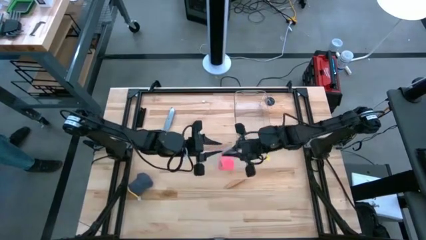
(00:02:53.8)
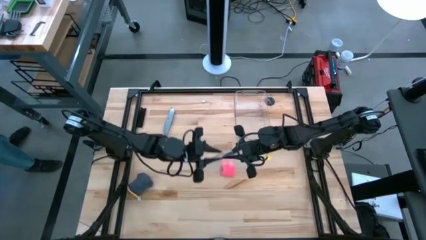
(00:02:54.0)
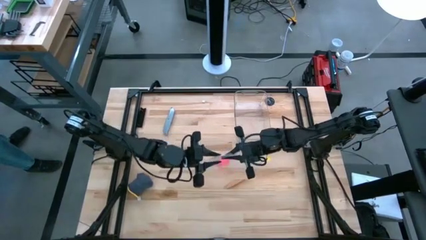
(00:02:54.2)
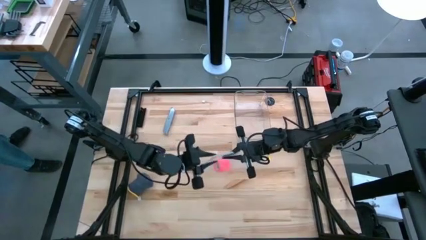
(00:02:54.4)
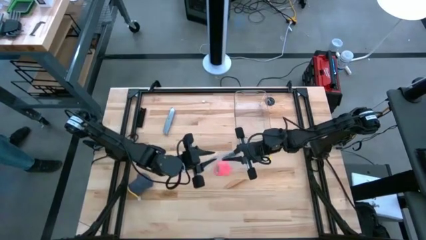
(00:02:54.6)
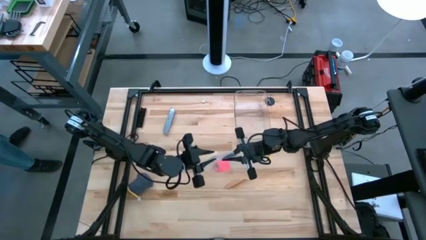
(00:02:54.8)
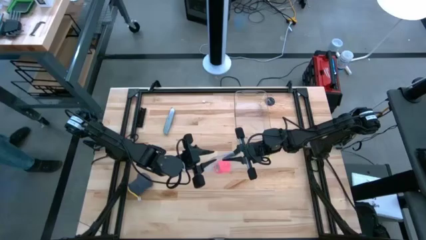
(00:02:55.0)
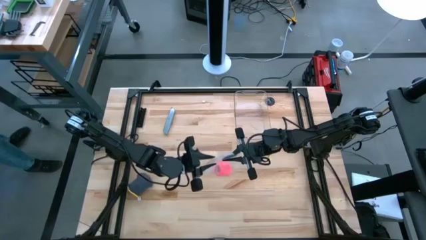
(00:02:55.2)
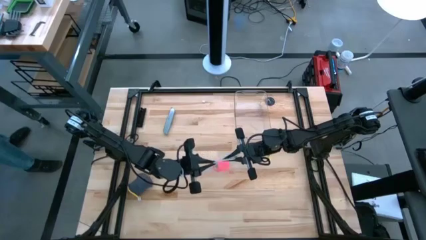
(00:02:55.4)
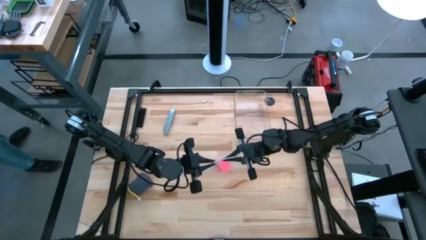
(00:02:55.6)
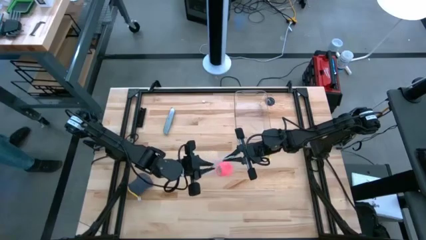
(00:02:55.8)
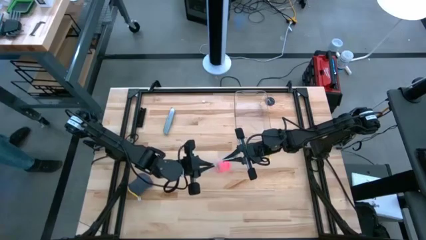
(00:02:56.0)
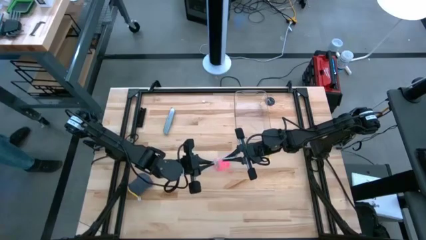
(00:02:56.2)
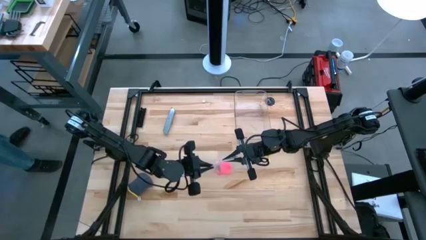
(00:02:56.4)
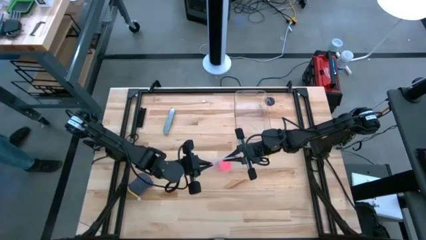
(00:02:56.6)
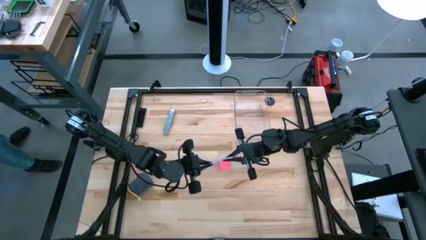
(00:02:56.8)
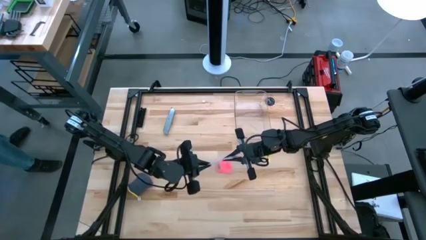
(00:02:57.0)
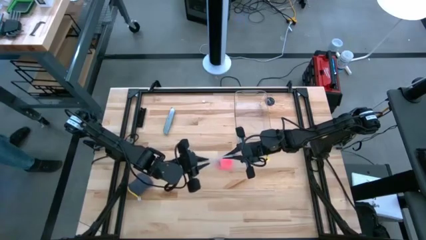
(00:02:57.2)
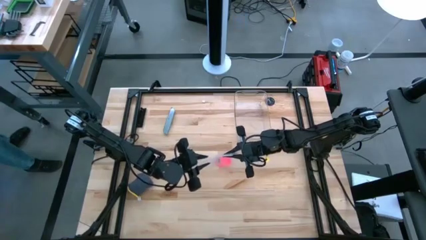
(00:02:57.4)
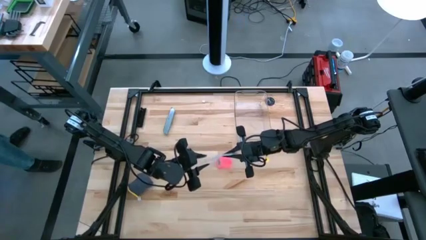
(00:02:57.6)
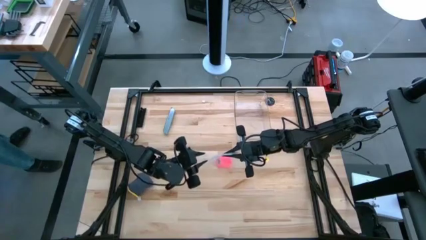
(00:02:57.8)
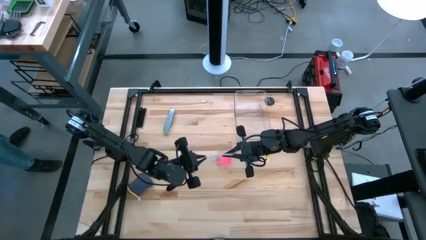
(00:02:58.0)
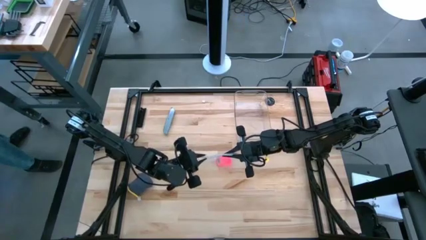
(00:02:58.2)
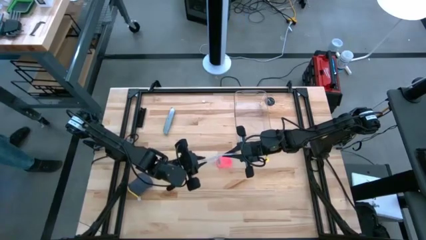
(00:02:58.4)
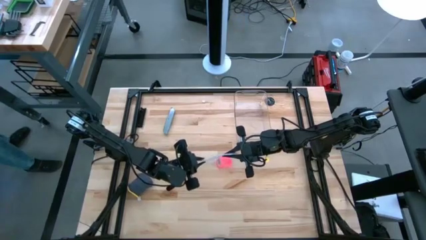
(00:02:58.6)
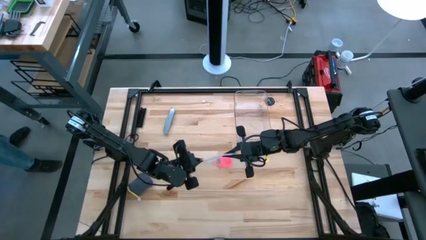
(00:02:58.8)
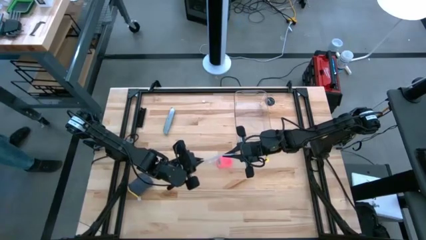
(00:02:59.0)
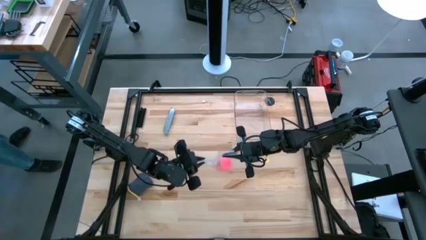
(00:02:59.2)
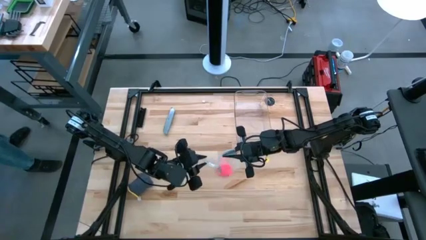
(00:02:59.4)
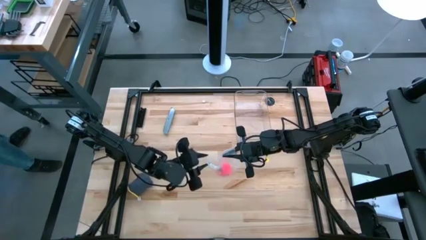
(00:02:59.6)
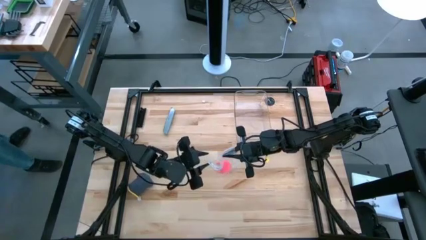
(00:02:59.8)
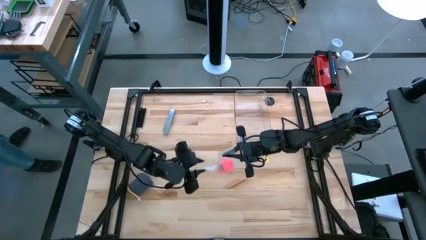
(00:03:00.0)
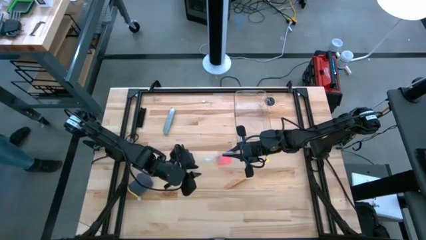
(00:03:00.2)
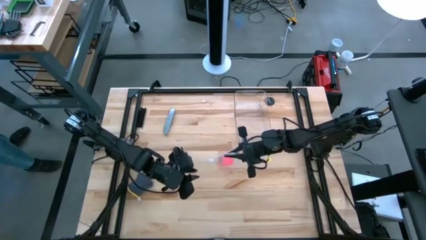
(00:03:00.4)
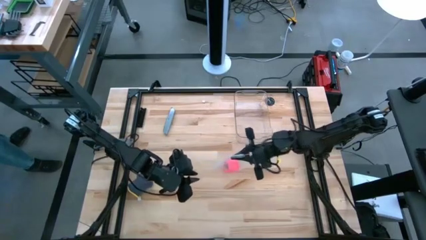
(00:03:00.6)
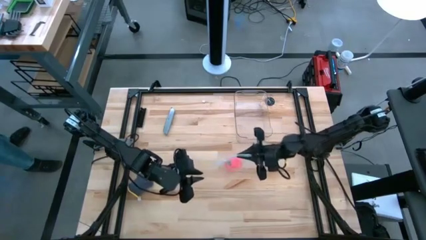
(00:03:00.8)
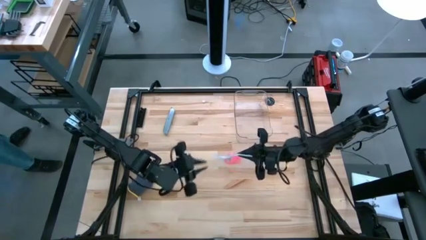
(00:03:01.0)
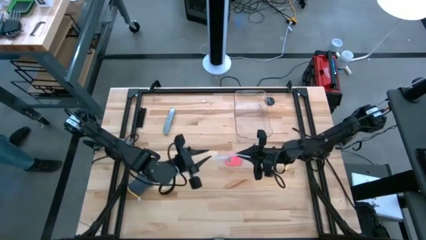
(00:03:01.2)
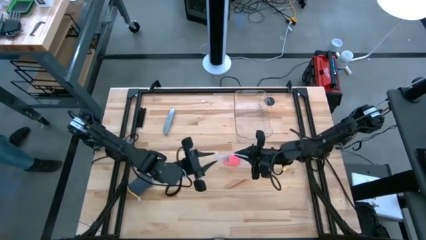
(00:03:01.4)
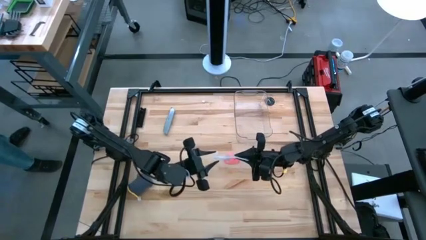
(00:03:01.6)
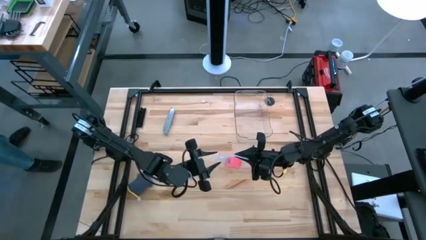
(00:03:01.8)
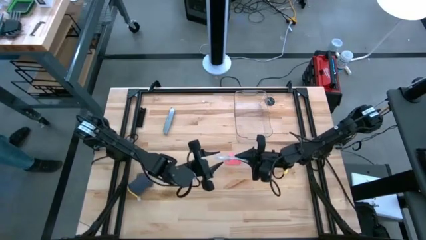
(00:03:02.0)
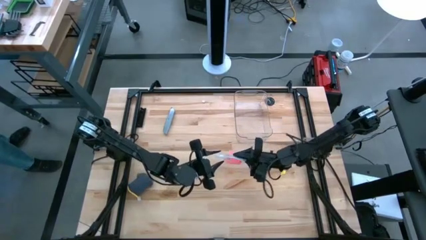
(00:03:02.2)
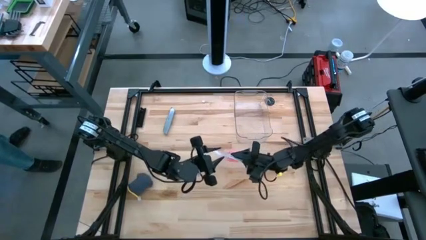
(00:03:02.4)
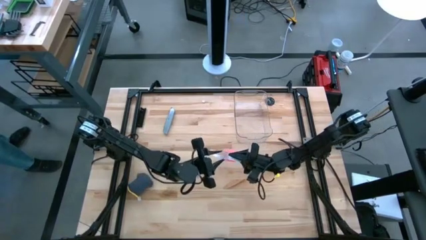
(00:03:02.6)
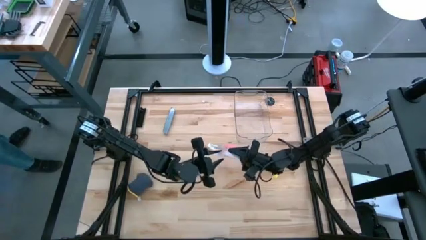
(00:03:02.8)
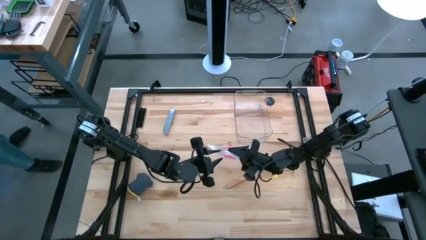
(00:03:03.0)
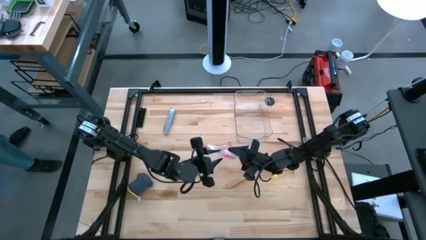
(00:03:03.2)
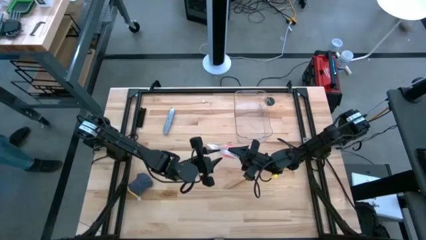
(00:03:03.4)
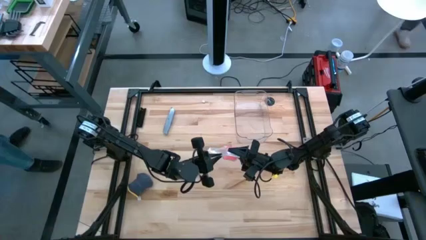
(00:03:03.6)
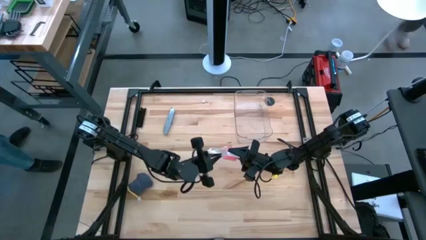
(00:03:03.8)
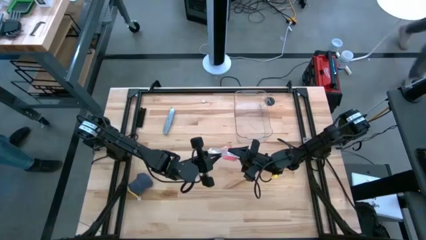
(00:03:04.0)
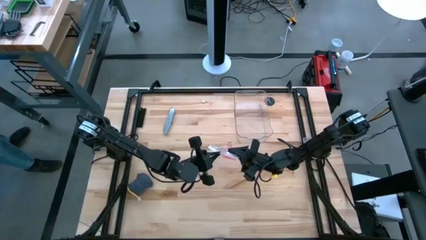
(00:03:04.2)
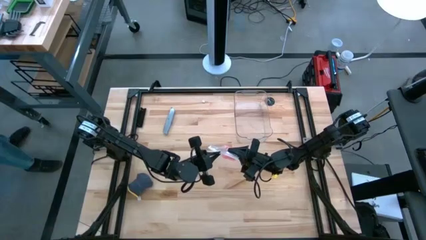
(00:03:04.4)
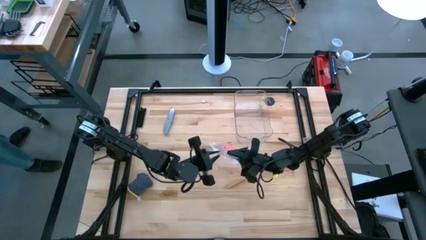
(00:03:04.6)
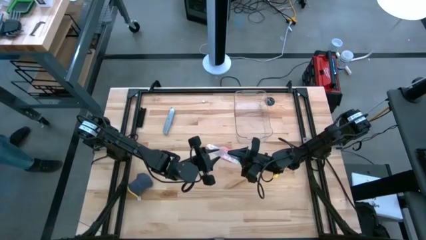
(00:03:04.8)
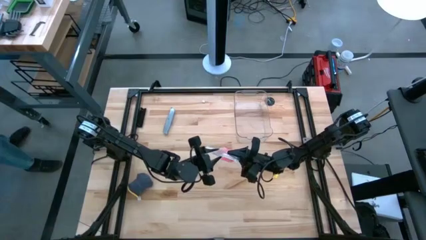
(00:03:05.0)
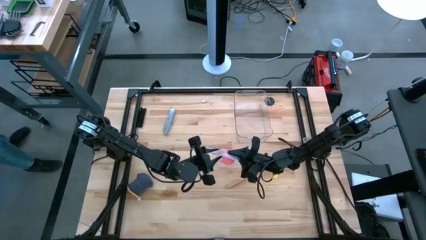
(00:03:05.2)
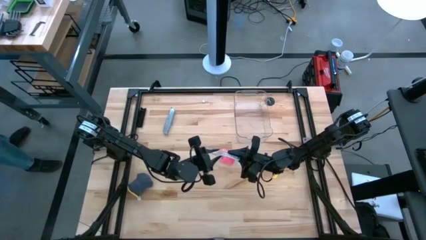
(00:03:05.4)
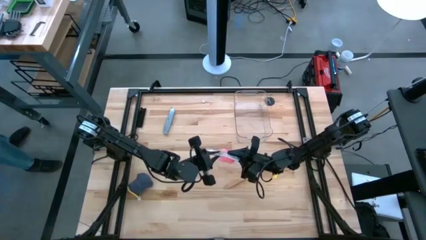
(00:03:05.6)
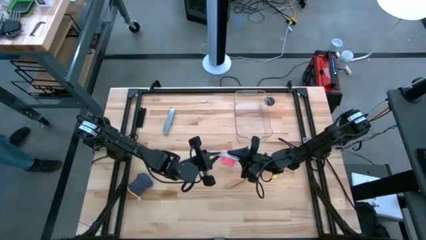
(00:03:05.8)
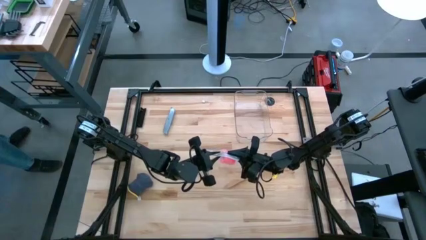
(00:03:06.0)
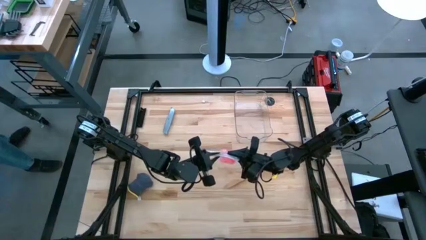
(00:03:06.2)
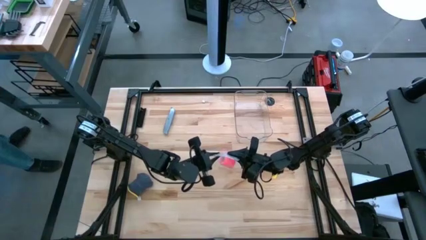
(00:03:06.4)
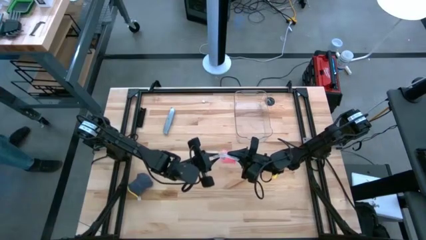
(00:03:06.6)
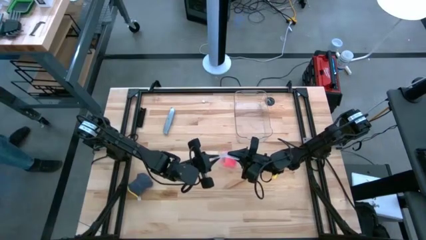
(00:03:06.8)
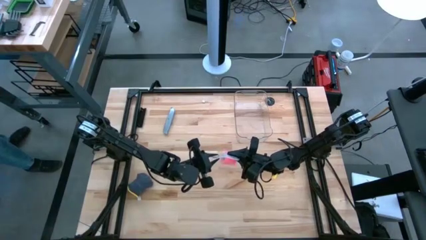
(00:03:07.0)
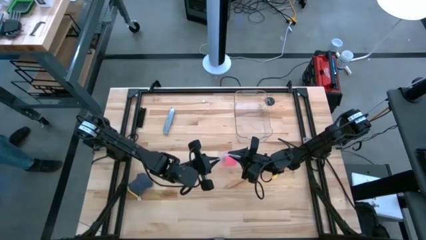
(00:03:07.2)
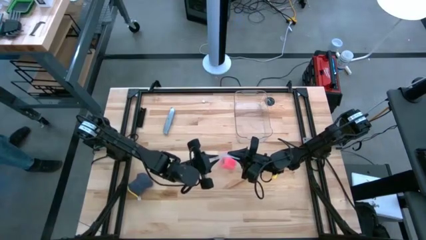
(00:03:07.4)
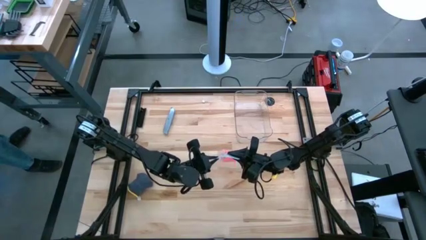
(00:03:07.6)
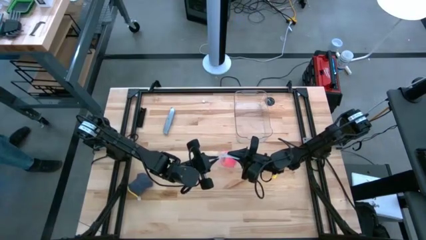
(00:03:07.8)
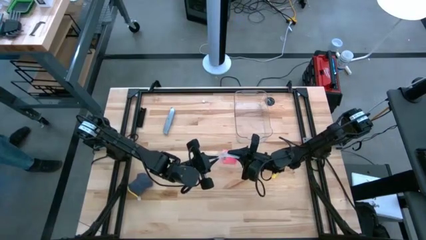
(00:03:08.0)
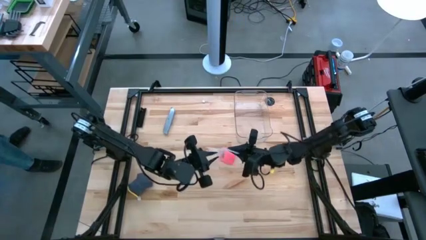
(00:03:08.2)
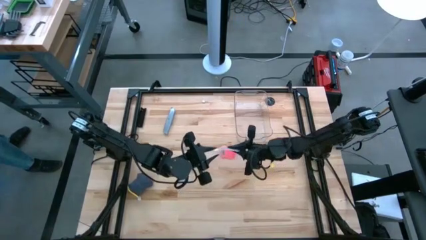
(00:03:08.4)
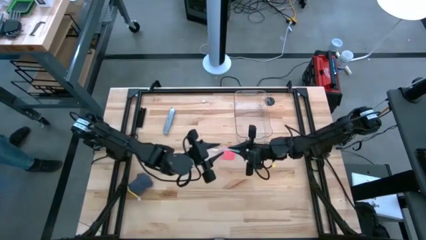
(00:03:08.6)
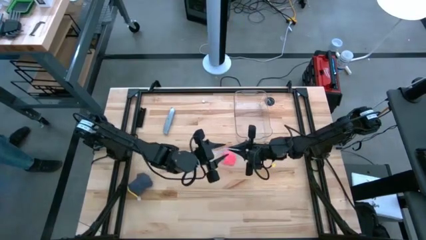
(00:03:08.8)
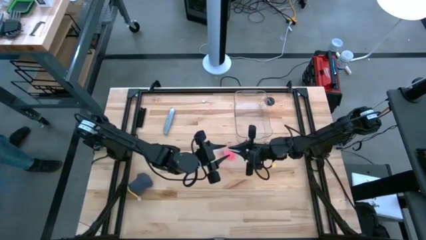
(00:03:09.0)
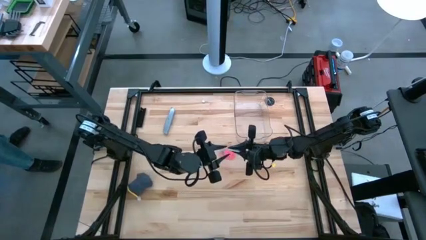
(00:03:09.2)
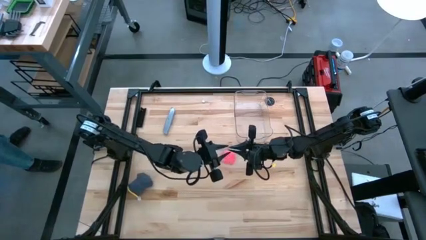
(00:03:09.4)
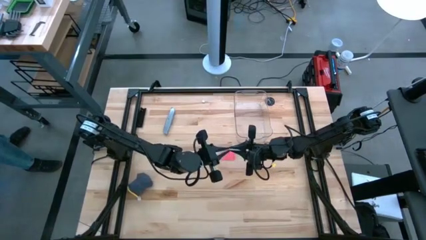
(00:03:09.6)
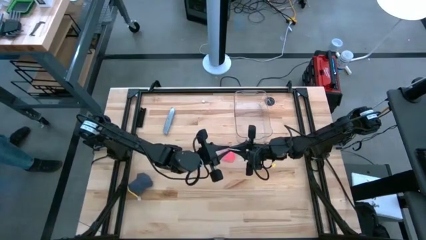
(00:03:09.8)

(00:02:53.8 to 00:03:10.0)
Task: Roll bandage
Close the transparent zip bag
